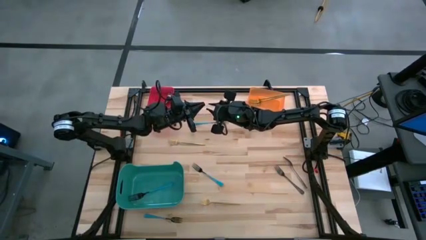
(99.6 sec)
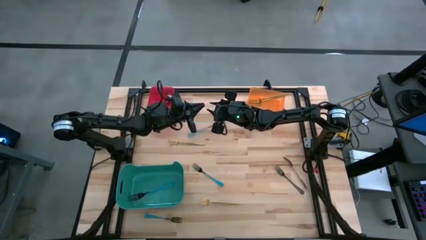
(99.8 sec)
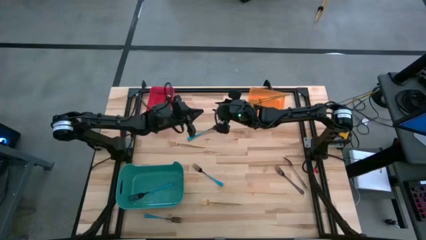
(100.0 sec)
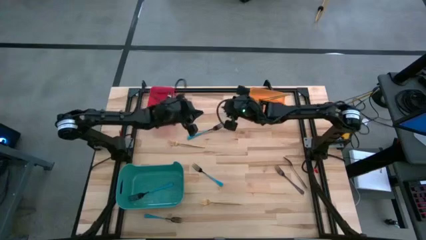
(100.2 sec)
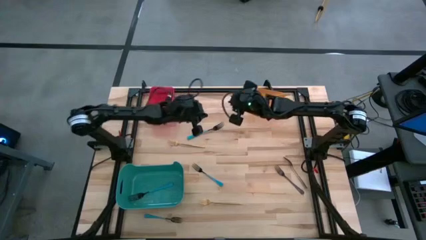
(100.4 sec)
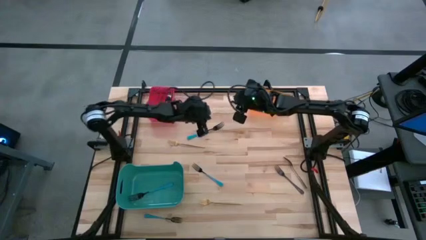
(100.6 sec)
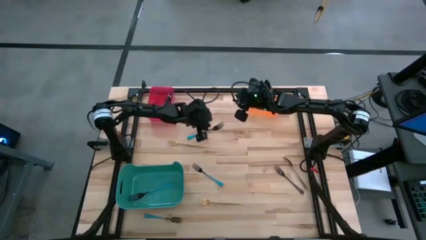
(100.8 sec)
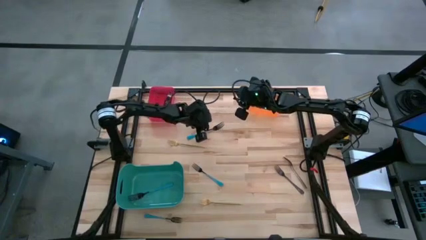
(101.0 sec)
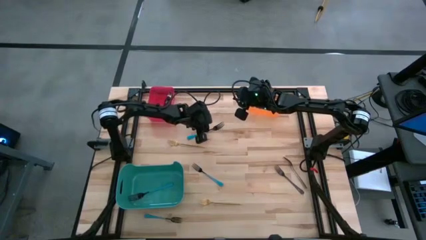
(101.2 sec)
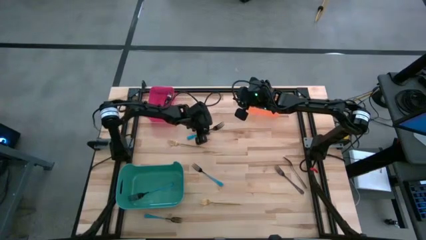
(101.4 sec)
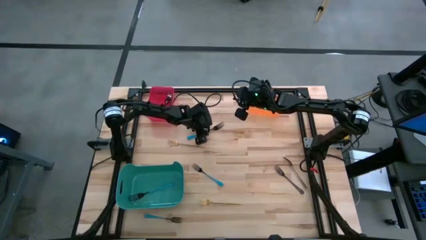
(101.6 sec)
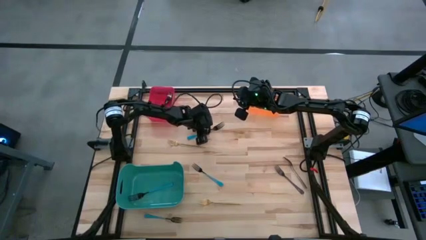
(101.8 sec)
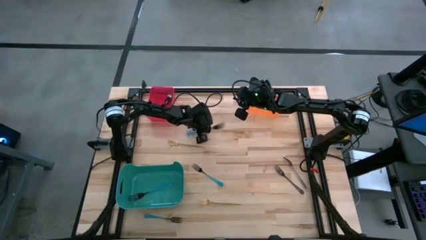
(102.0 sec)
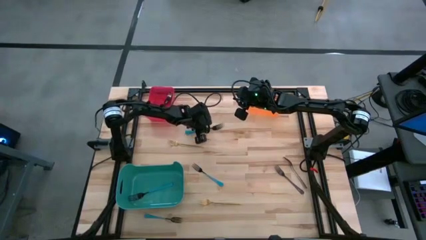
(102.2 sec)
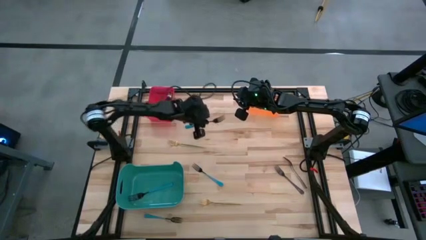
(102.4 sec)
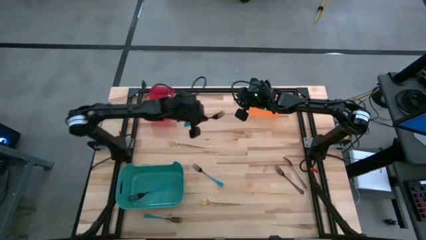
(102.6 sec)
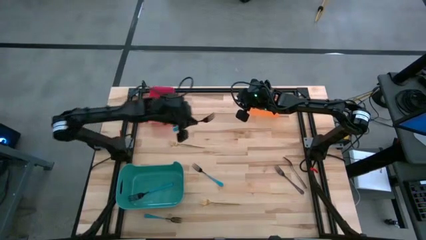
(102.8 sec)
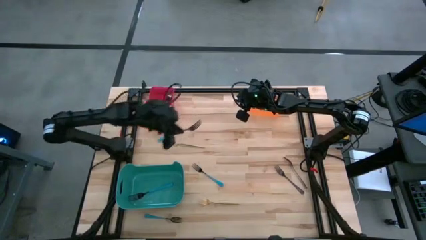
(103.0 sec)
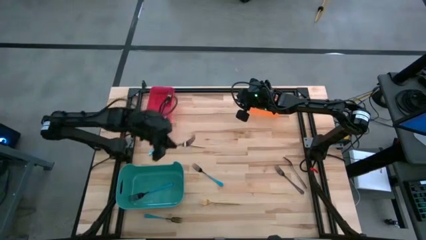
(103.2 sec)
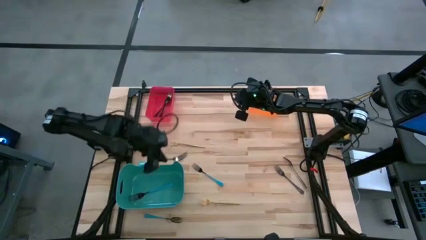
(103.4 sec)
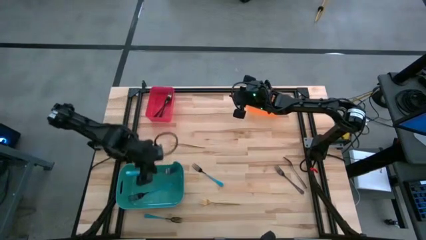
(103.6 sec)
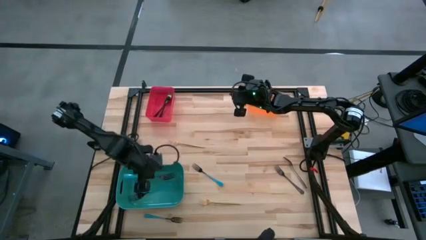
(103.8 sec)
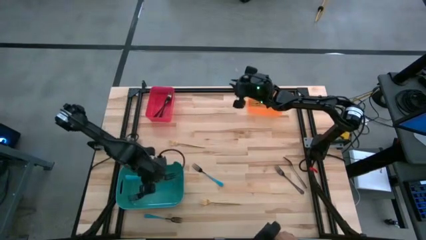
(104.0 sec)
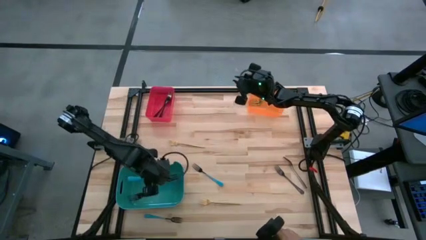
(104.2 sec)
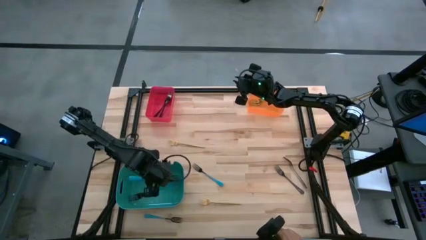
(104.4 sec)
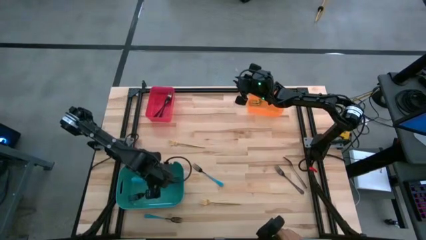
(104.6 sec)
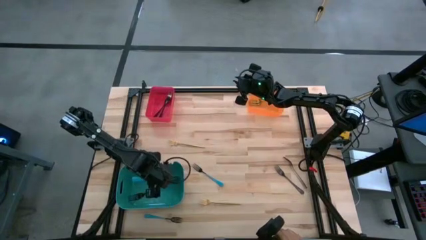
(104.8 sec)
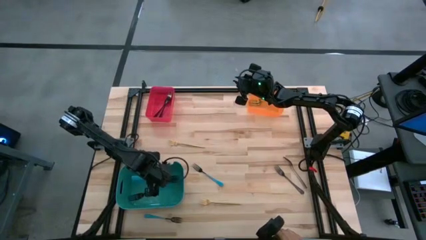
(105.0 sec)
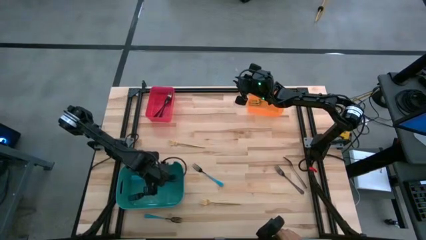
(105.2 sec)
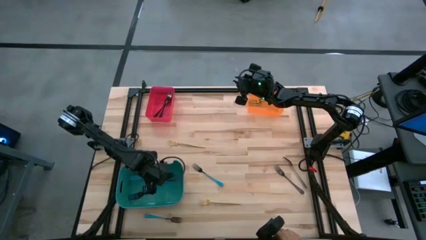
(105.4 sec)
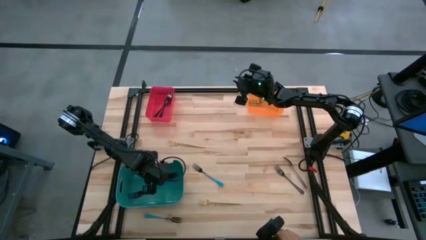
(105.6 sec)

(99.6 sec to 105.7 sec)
Task: Sort silverware by color (type)
Put the blue fork into the green bin

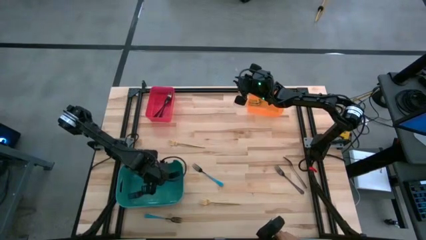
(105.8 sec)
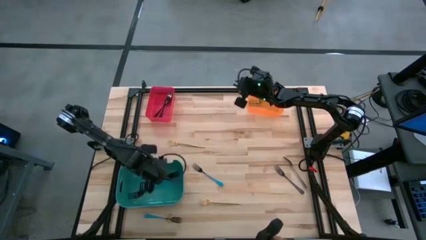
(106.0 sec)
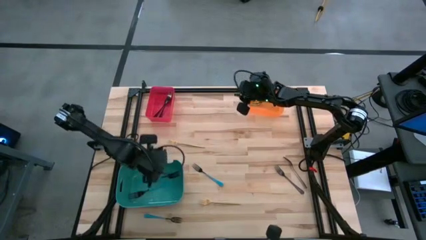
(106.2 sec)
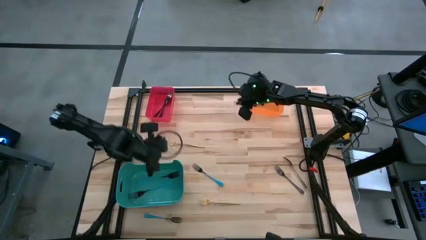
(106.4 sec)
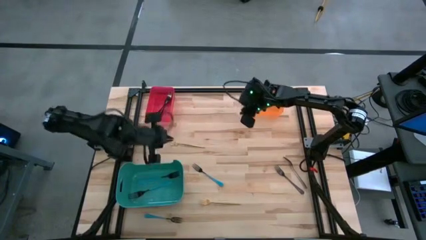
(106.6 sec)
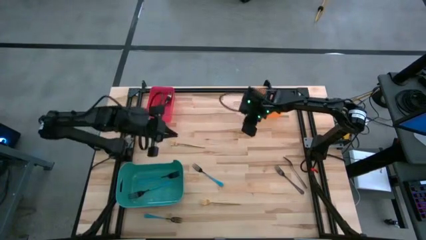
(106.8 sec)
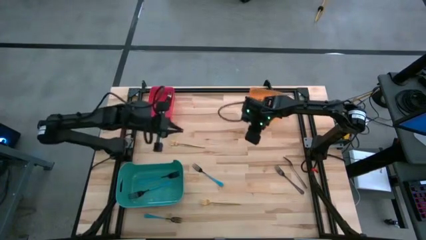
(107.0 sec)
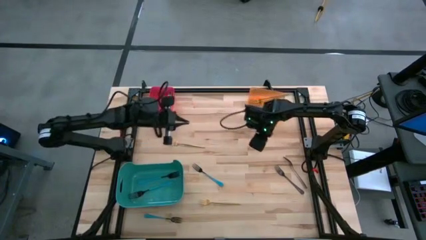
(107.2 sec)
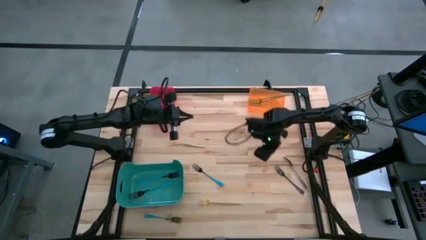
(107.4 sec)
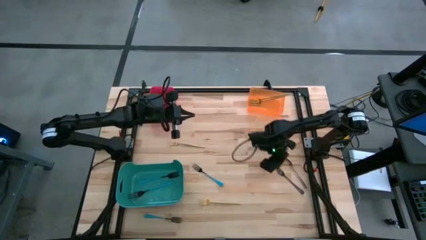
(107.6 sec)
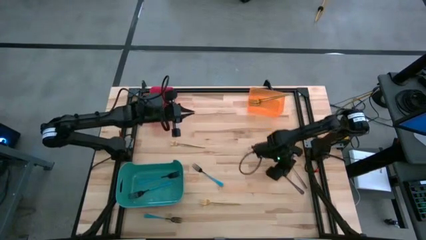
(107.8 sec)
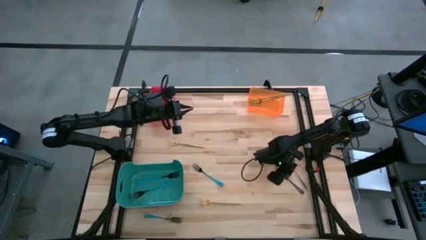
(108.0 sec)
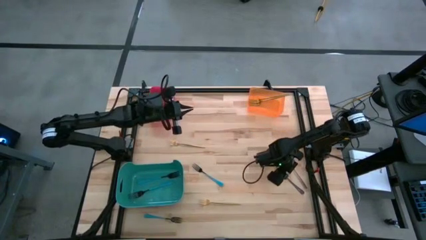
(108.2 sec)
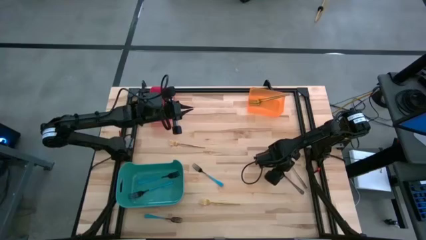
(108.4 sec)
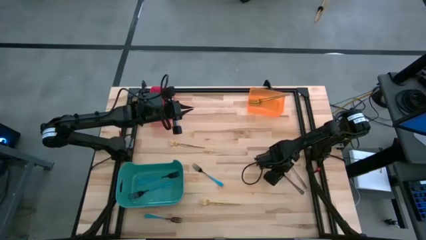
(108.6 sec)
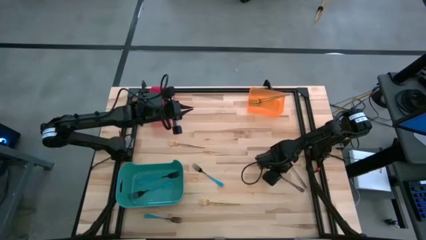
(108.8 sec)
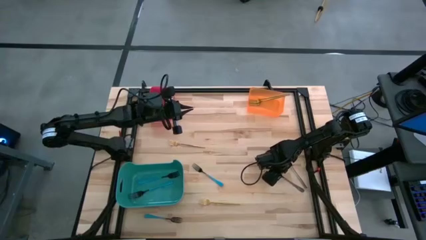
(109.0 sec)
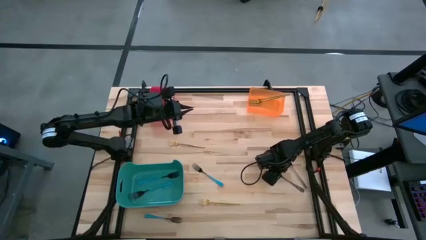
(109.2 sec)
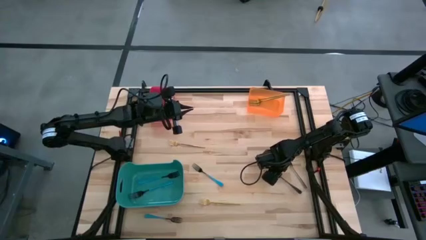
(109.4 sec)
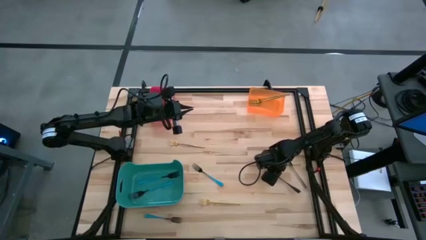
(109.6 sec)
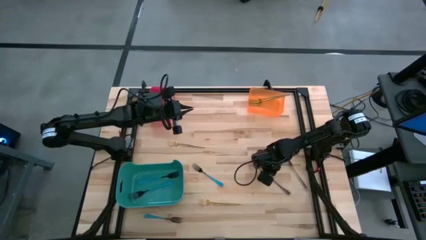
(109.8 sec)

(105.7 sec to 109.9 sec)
Put the black fork into the red bin

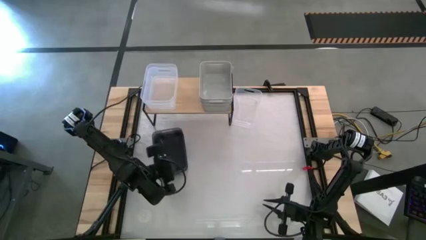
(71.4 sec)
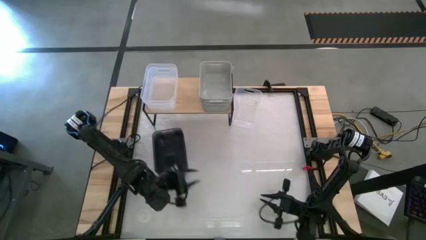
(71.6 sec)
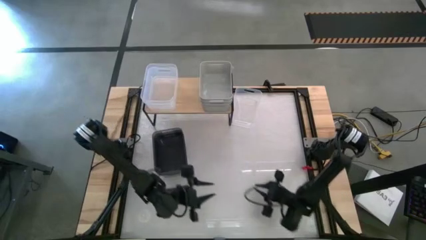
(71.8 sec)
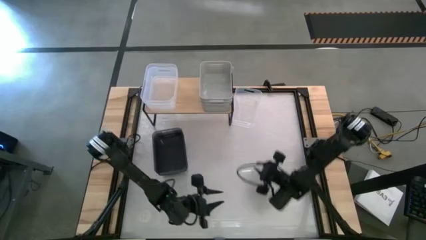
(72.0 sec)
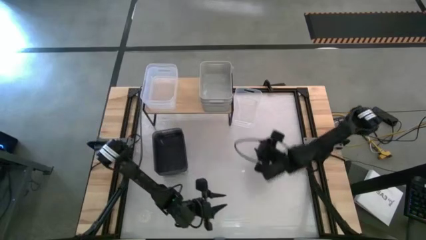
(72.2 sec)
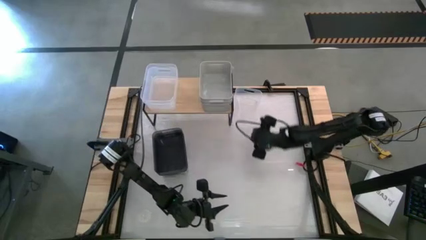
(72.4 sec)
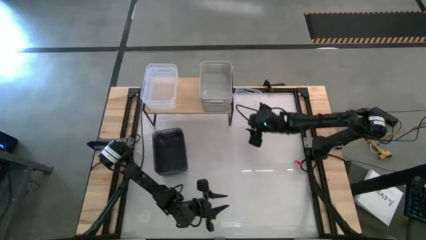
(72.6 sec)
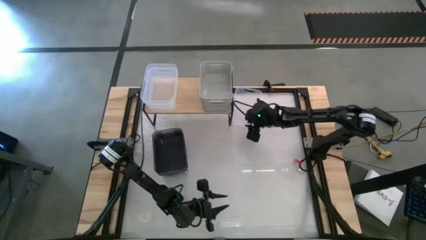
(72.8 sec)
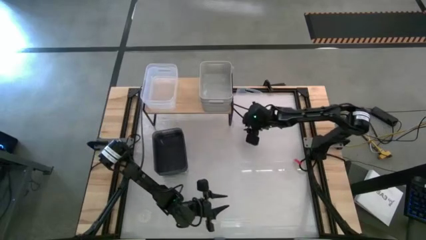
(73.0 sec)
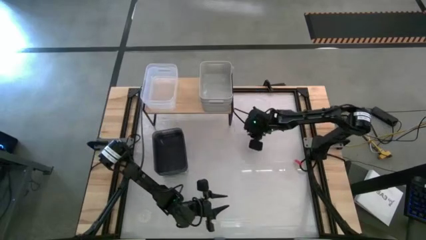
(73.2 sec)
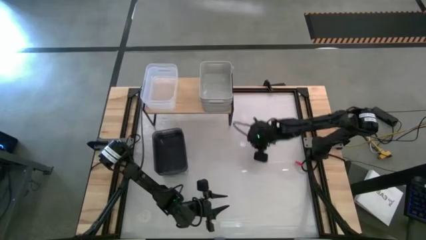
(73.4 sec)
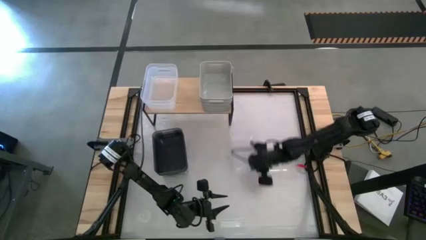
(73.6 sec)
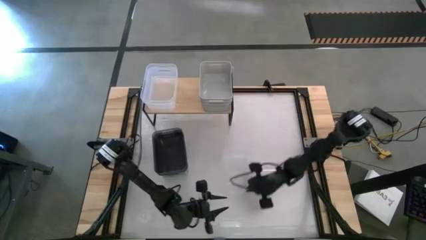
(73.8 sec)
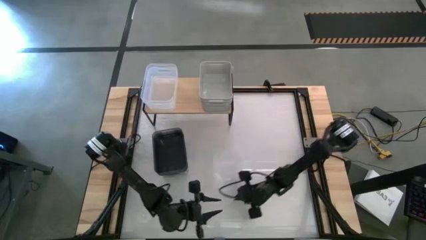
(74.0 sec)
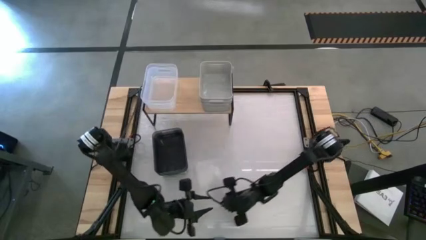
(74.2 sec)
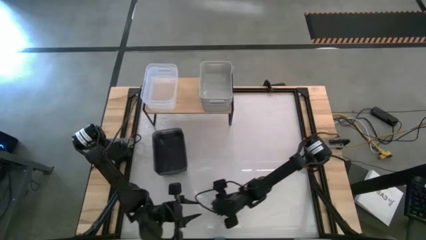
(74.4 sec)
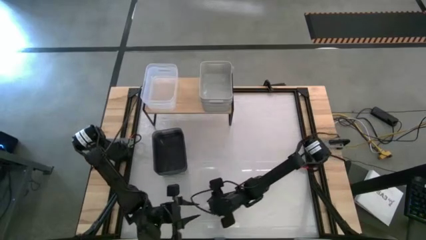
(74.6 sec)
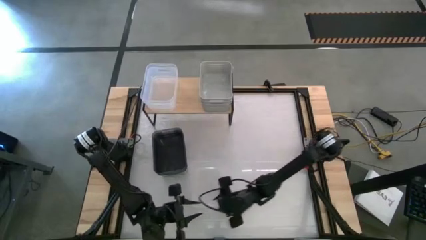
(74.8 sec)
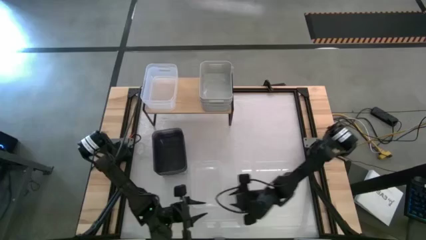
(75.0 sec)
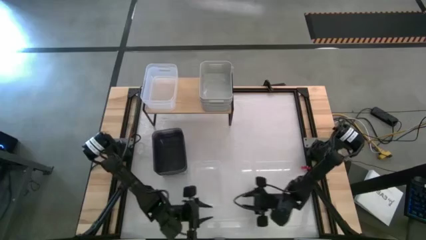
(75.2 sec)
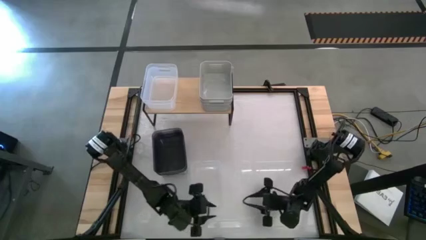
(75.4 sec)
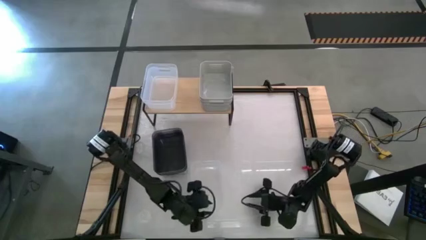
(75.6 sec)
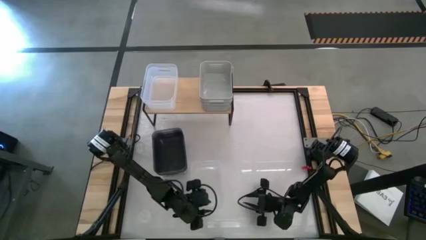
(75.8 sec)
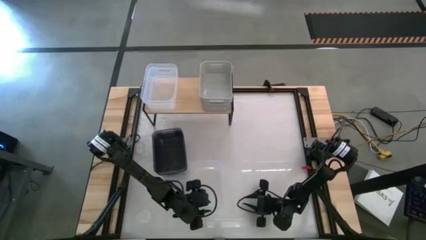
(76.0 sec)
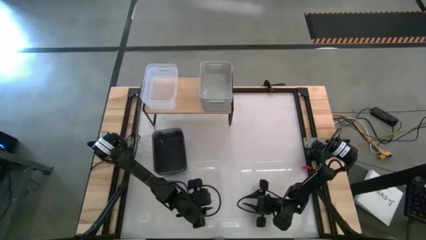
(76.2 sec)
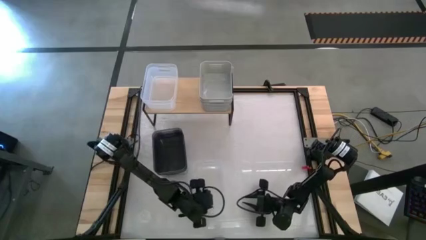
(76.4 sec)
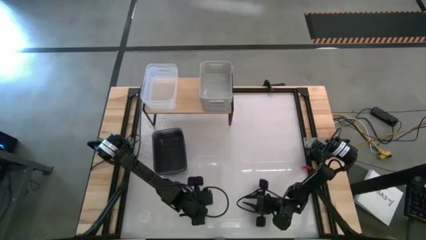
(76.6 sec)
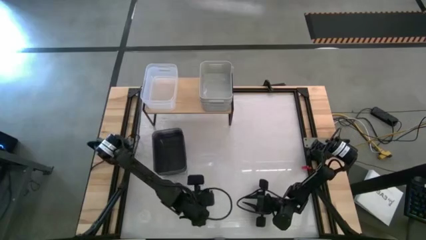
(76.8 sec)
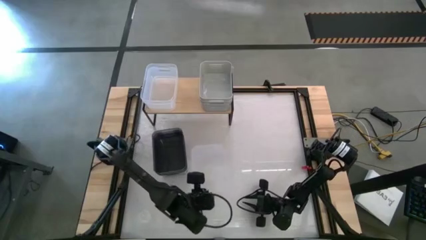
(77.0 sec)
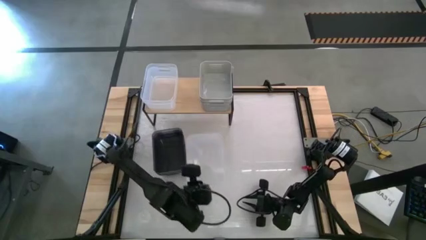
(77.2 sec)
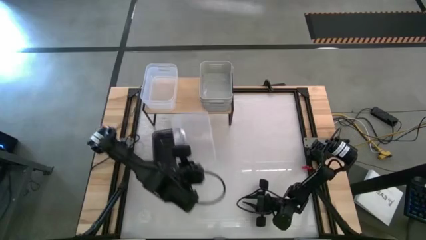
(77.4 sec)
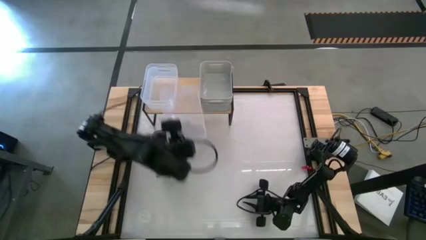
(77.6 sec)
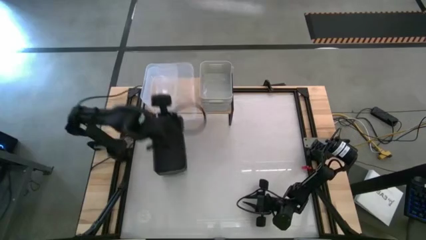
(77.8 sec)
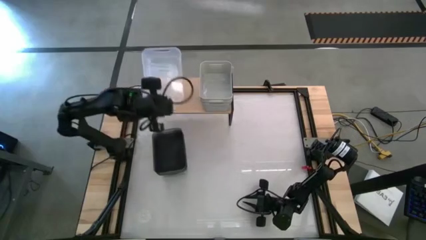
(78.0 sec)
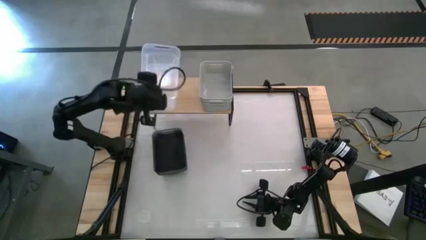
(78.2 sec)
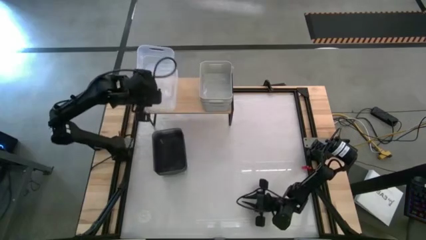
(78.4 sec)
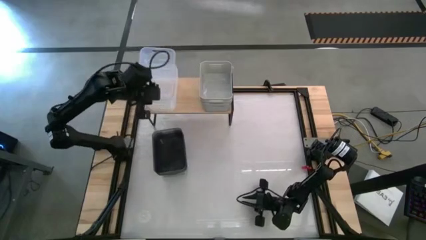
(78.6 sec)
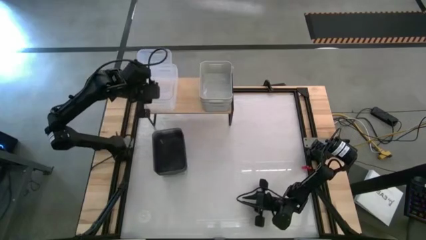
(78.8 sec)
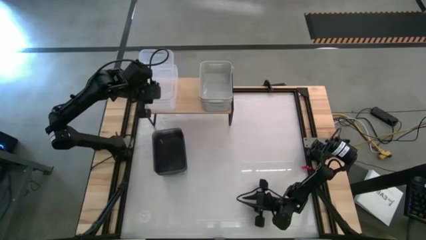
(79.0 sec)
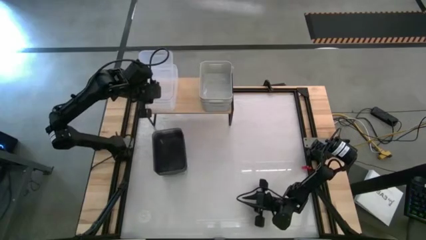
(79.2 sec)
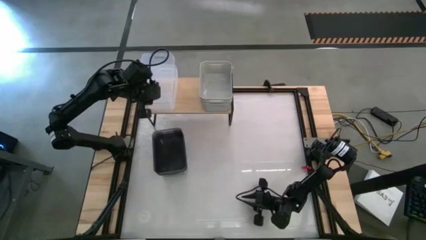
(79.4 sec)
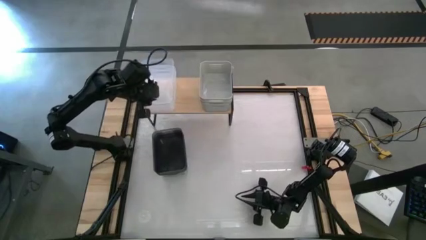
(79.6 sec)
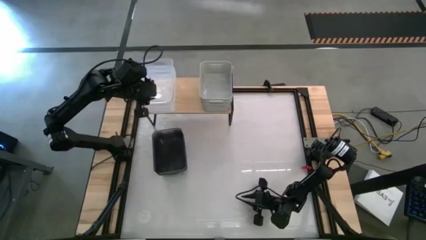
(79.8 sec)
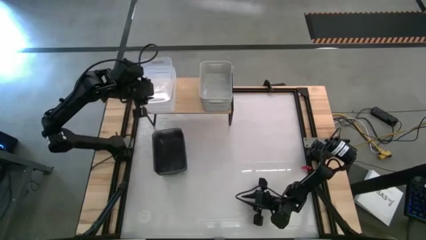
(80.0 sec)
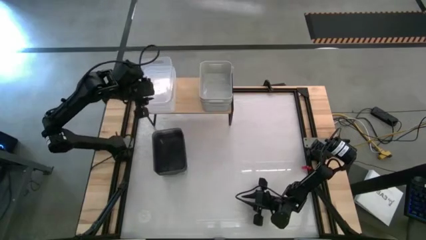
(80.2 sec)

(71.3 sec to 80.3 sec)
Task: Stack baskets on shelf by color
Stack the transparent bin on top of the transparent bin on the shelf
